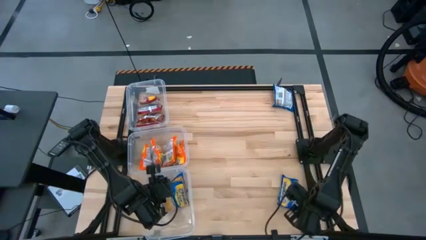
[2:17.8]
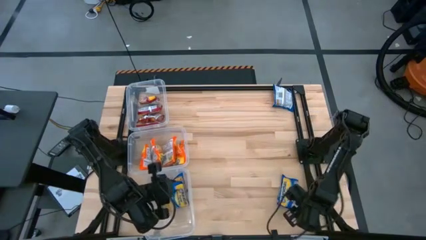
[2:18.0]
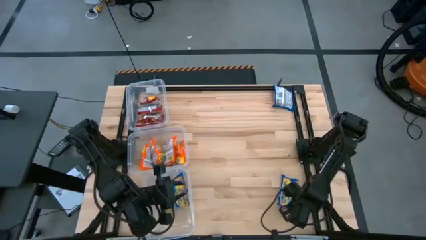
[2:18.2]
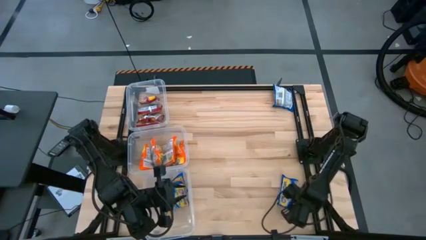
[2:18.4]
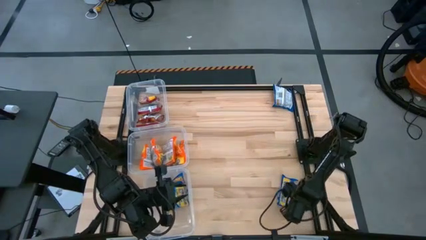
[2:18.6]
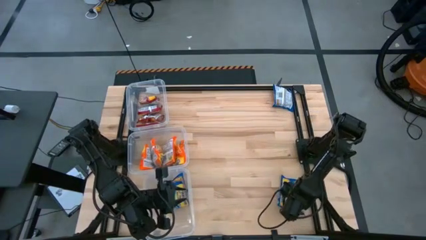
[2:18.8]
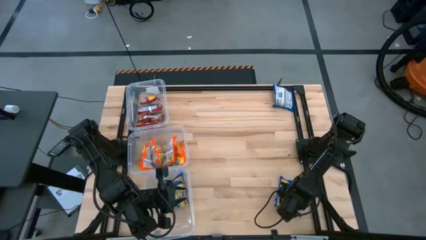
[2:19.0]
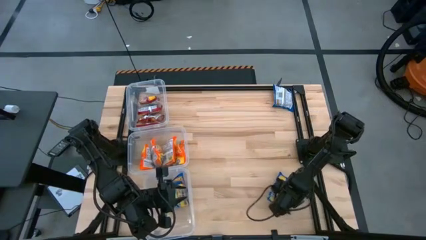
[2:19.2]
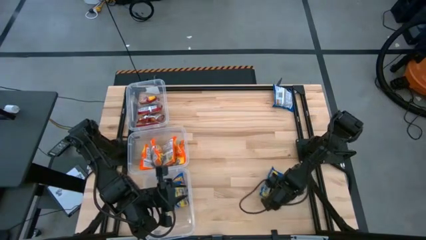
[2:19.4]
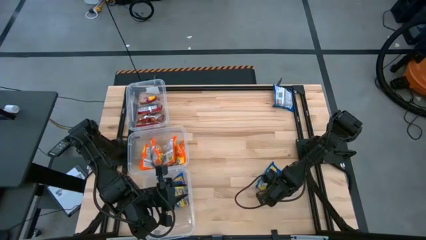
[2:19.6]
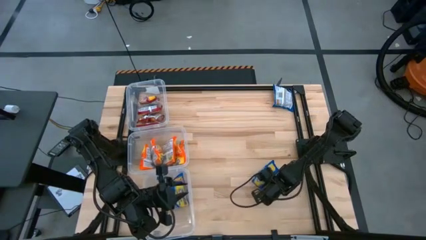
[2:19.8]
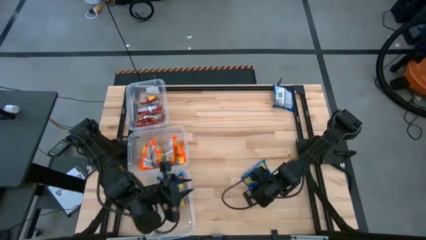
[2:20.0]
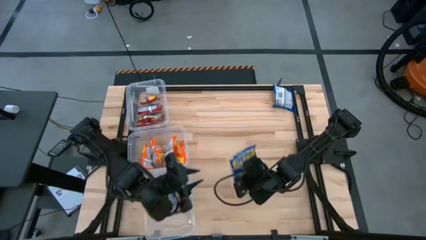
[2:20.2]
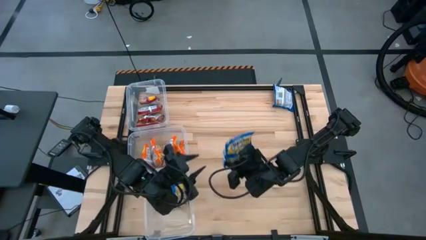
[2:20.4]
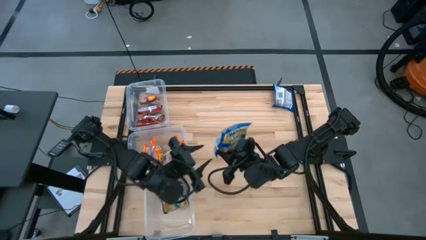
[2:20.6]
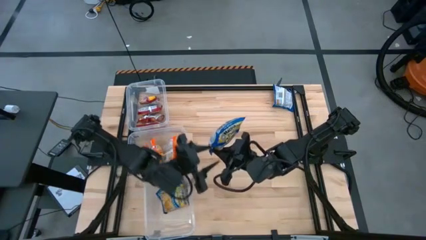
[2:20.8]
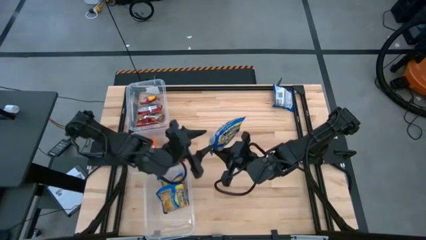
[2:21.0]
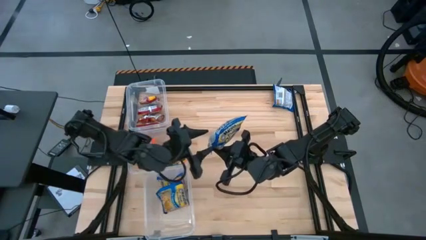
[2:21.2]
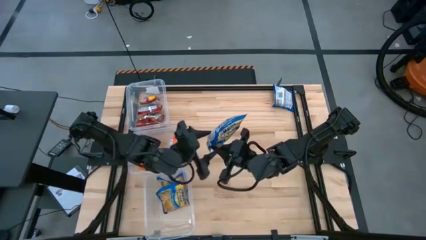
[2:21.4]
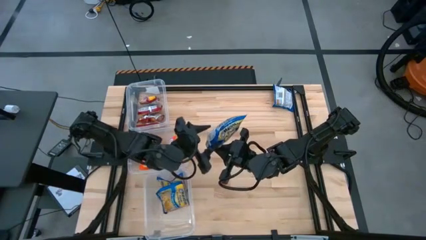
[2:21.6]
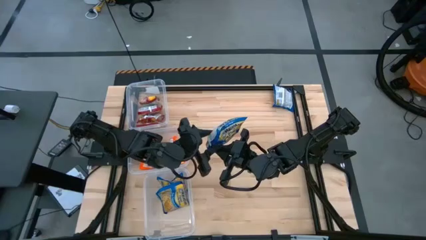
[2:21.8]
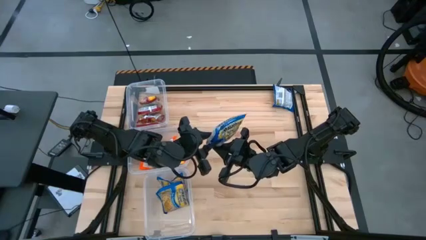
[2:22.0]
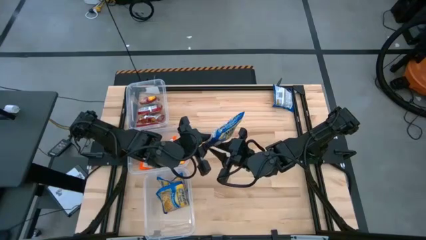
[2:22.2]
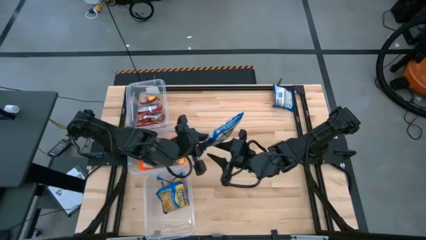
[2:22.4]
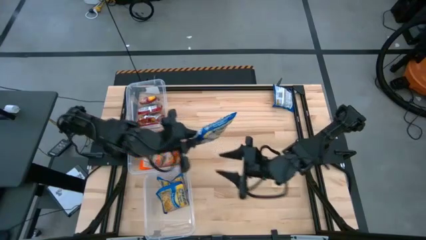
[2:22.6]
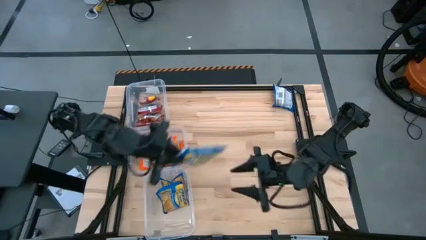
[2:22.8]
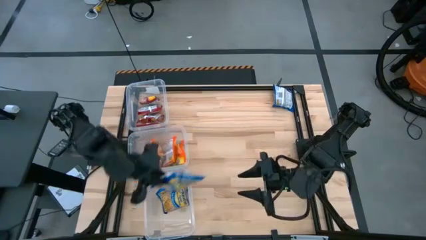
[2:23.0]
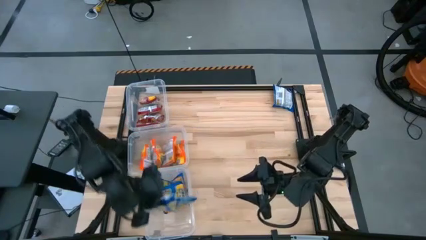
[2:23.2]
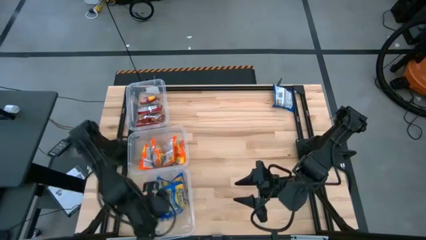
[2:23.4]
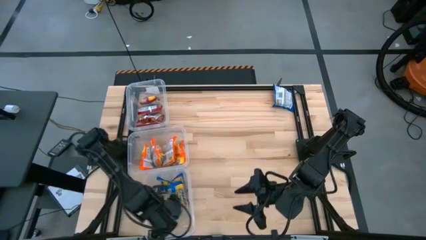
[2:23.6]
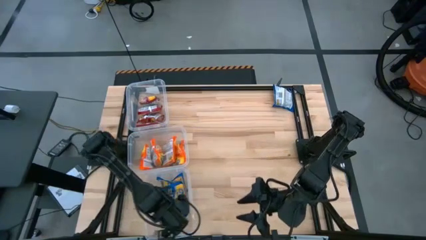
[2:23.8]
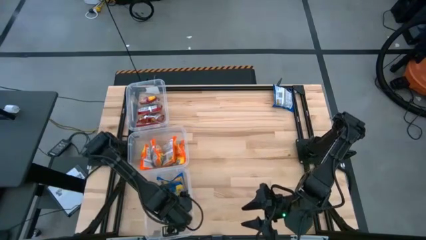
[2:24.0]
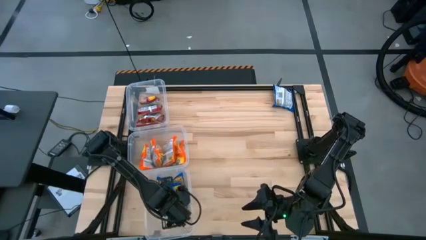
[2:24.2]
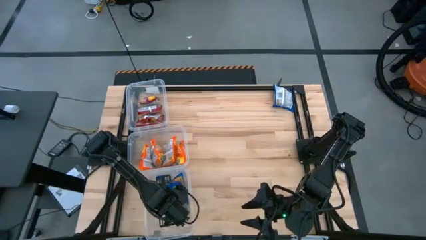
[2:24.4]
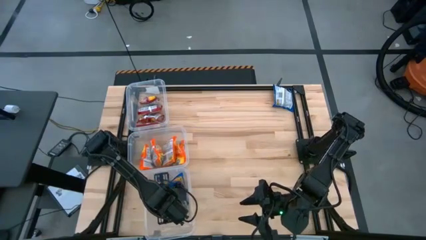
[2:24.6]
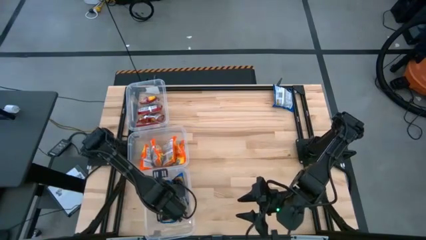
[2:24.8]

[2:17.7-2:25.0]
Task: Sort Maruchan noodles
Put the blue noodle pack into the bottom transparent bin

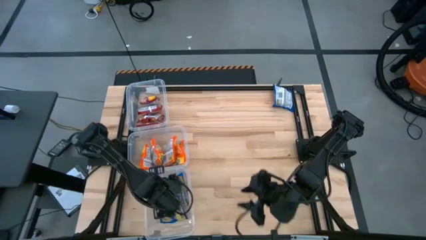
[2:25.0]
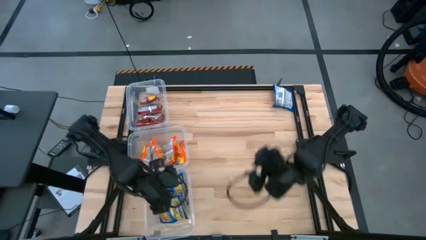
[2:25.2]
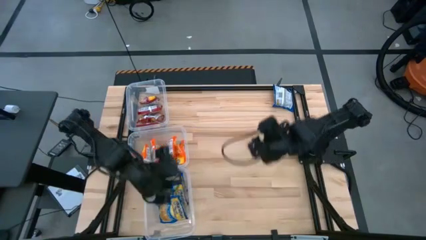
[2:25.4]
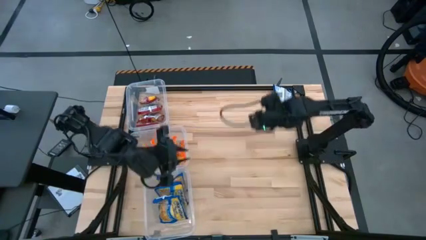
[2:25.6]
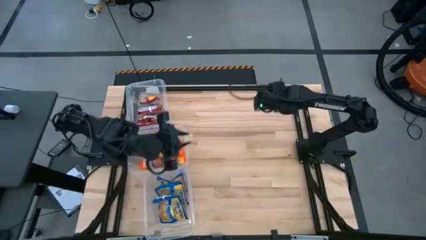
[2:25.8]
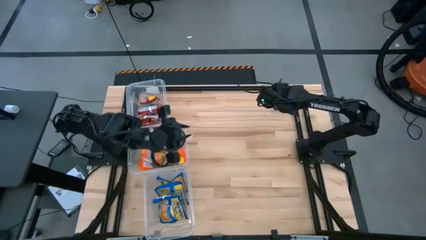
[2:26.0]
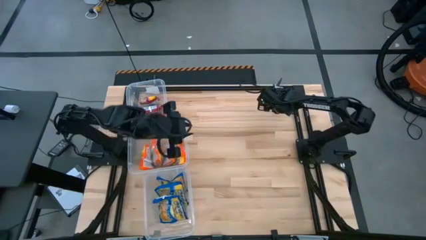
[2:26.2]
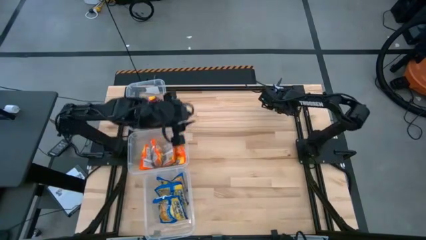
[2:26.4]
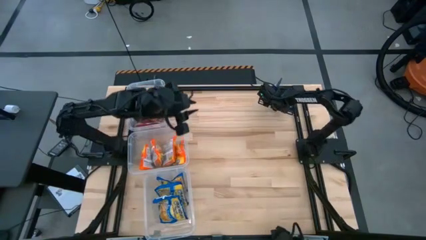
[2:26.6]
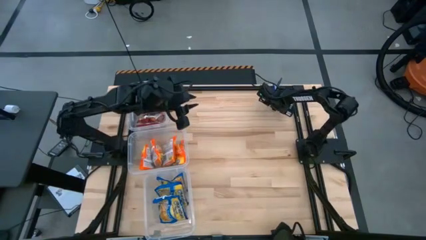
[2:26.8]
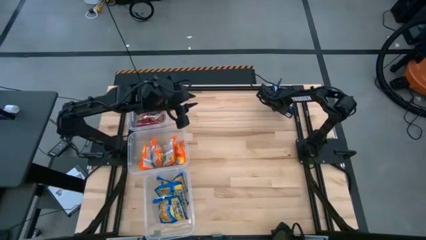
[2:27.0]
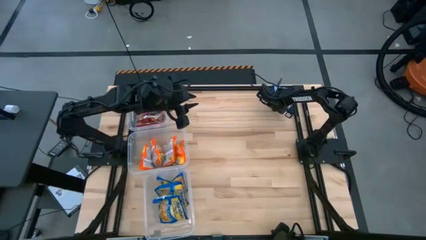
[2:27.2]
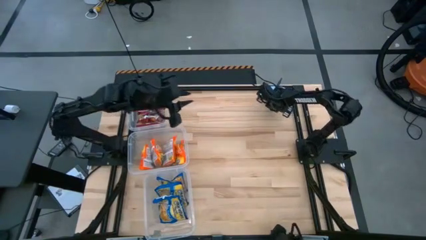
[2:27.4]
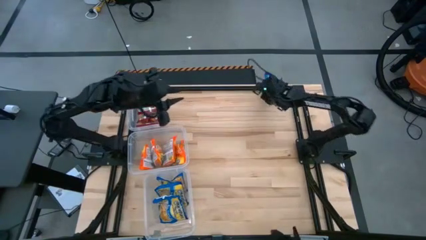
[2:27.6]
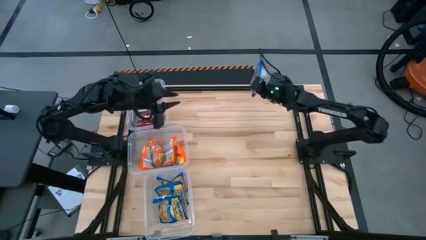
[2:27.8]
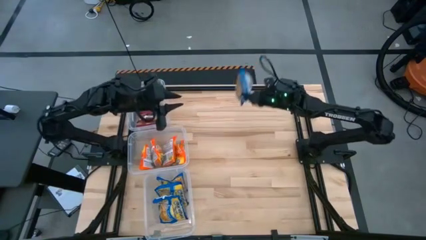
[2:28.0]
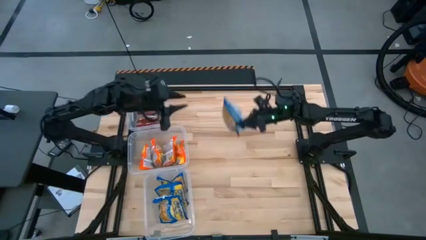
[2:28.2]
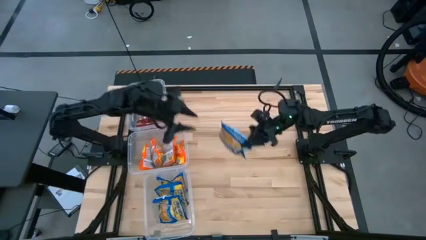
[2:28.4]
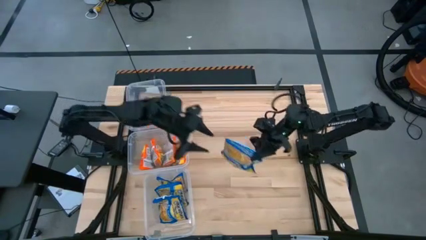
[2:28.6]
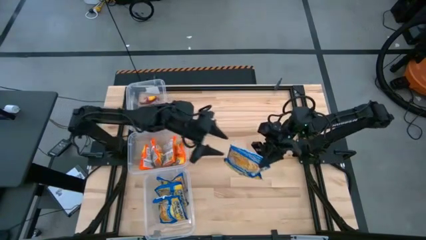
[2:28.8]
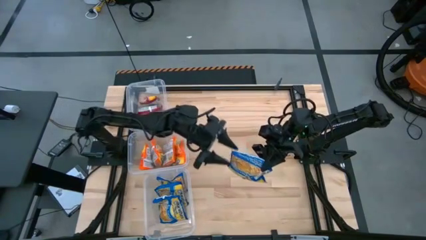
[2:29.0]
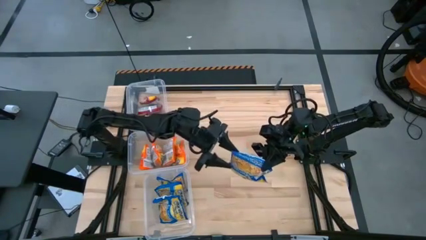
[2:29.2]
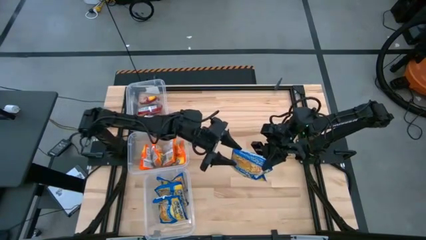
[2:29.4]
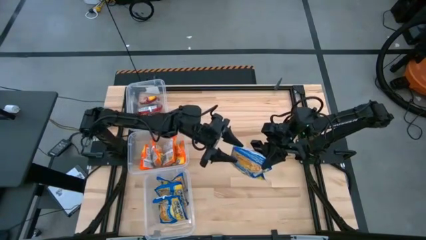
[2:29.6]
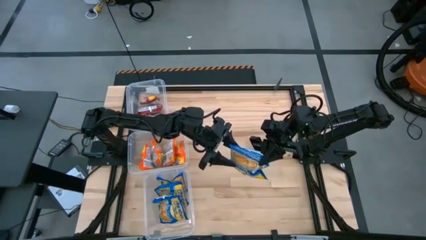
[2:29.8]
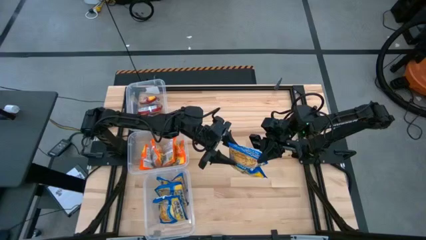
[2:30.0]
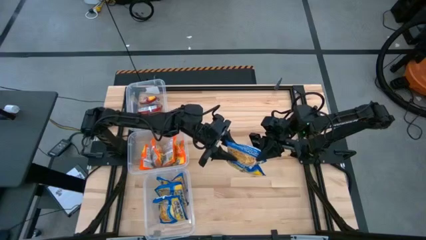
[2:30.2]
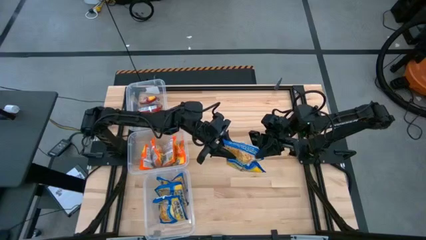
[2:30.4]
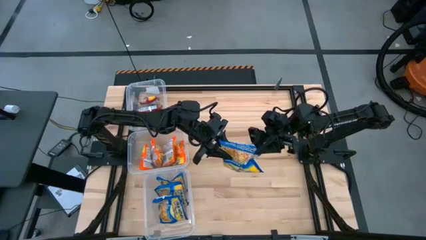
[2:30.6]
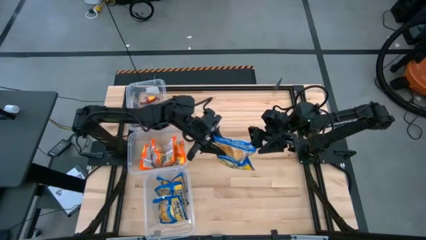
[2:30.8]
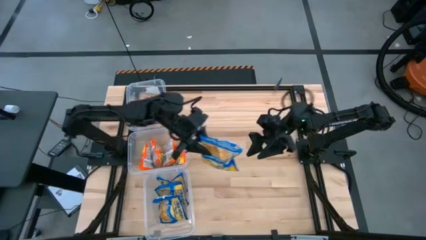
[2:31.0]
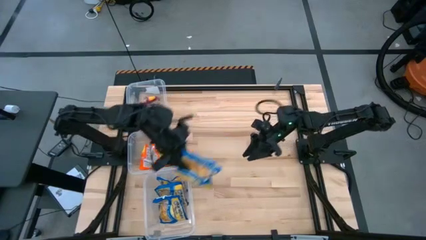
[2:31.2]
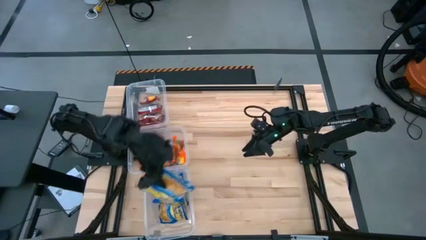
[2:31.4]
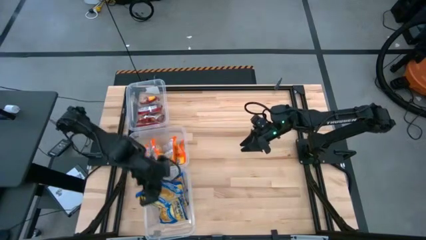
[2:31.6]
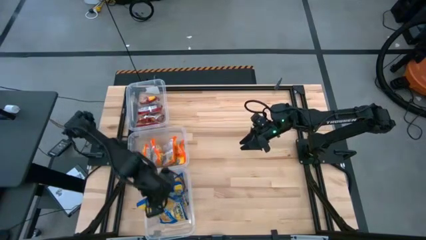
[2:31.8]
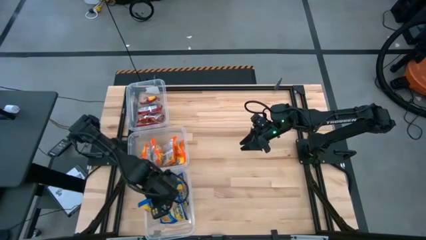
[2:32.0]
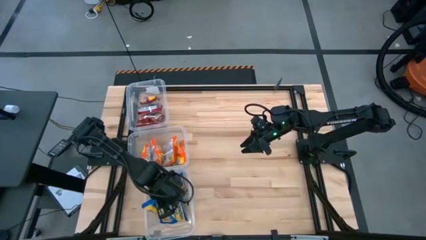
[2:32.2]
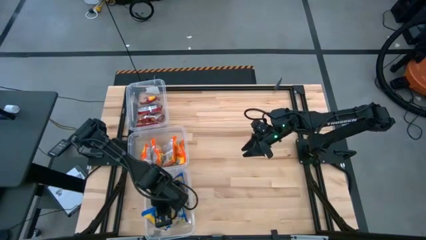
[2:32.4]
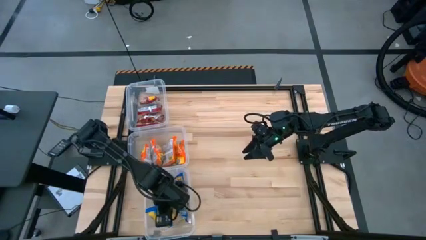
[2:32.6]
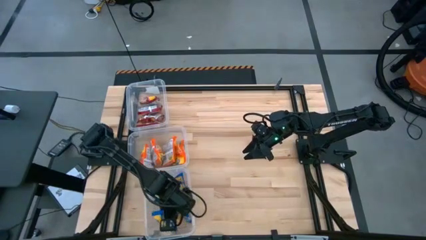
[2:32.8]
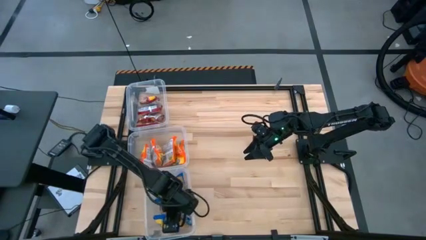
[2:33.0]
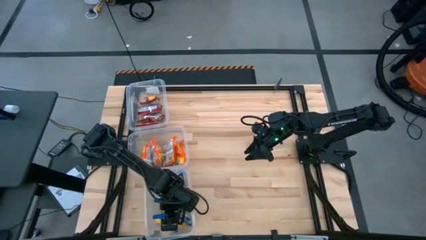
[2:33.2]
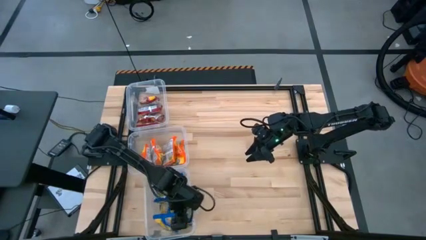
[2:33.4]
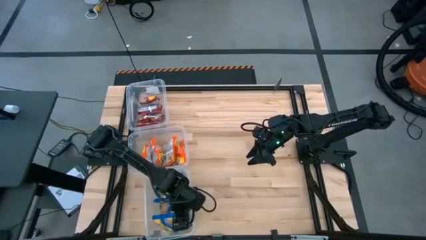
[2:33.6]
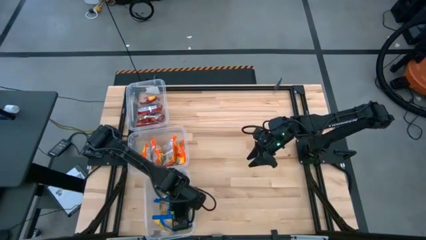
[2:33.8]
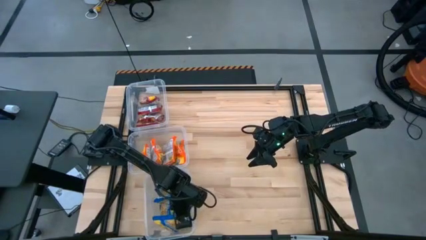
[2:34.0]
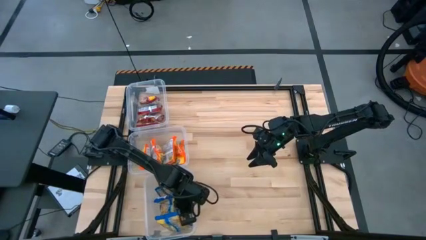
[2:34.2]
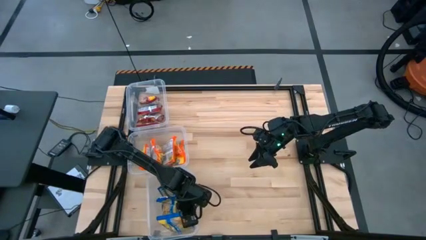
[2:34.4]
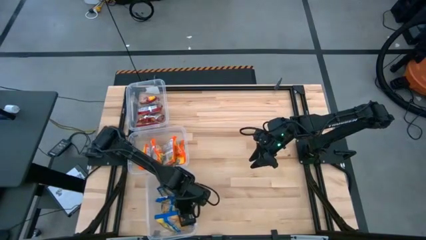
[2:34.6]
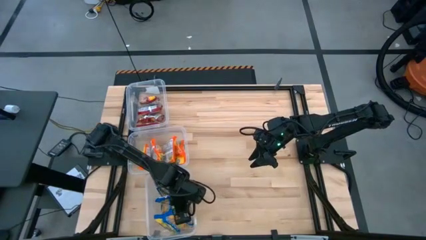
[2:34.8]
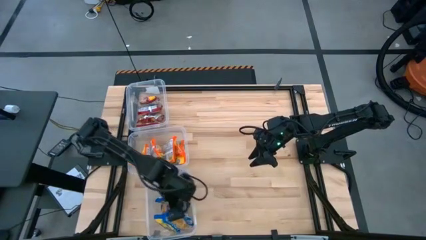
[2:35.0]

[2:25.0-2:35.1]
Put the blue noodle pack into the bottom transparent bin
